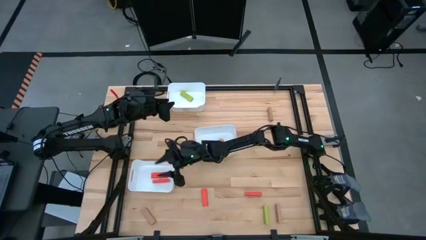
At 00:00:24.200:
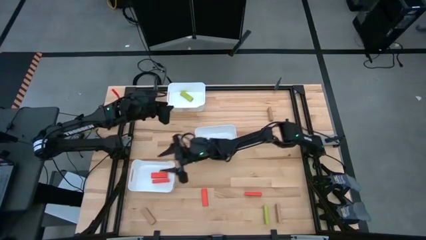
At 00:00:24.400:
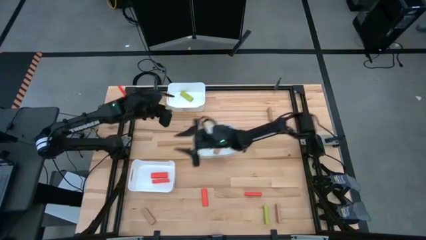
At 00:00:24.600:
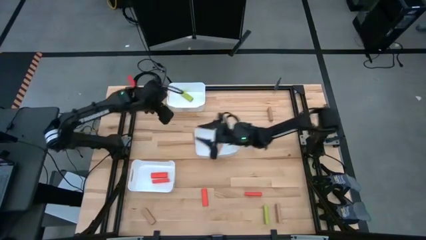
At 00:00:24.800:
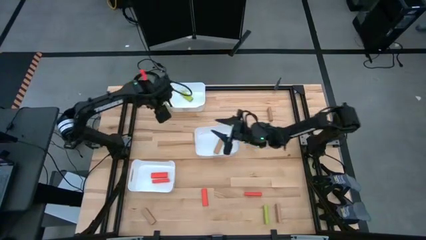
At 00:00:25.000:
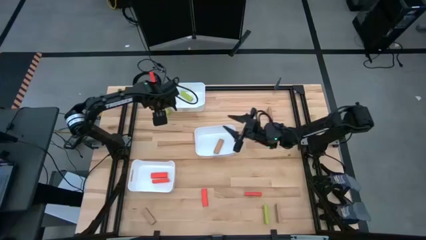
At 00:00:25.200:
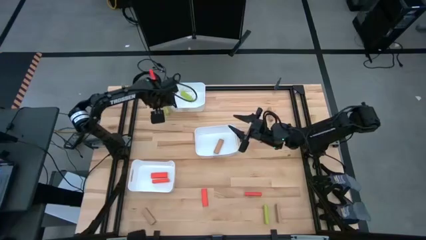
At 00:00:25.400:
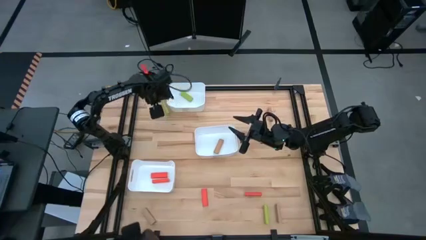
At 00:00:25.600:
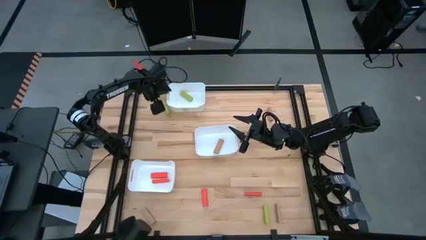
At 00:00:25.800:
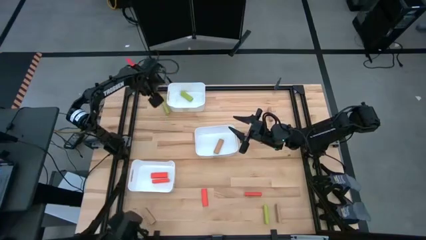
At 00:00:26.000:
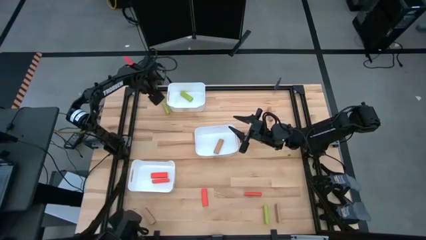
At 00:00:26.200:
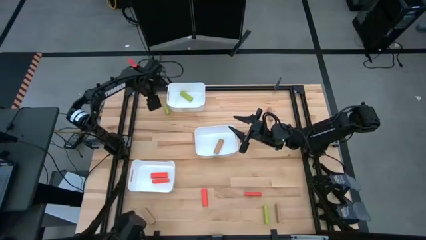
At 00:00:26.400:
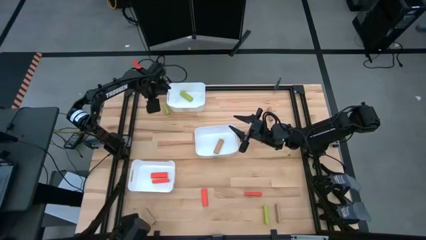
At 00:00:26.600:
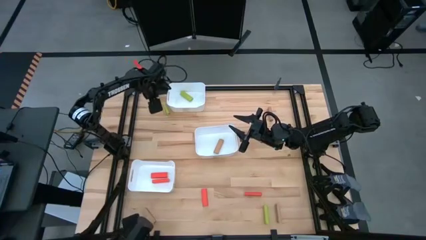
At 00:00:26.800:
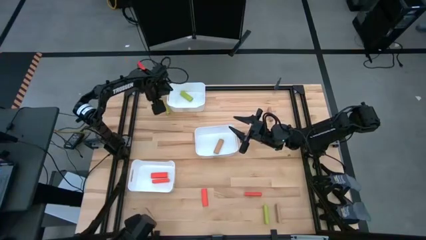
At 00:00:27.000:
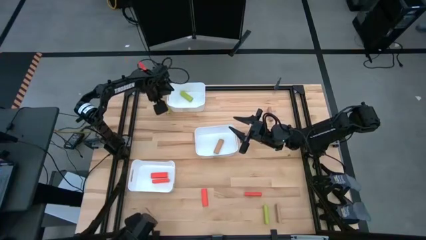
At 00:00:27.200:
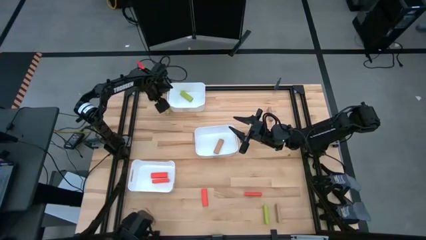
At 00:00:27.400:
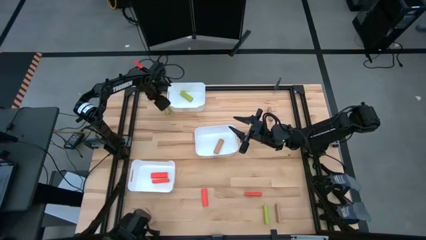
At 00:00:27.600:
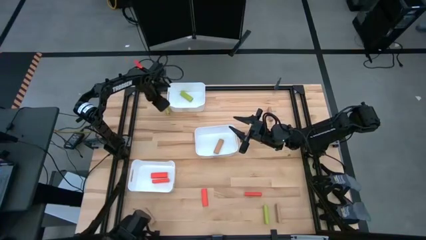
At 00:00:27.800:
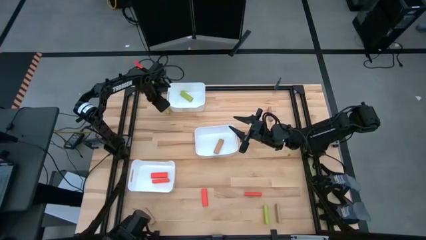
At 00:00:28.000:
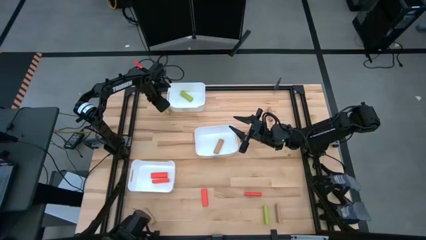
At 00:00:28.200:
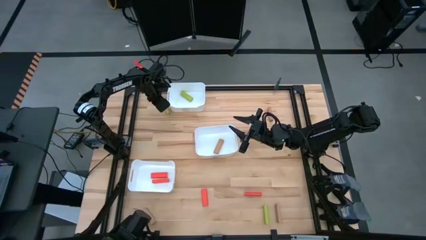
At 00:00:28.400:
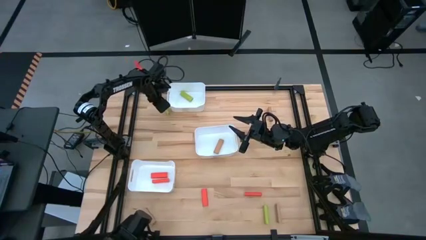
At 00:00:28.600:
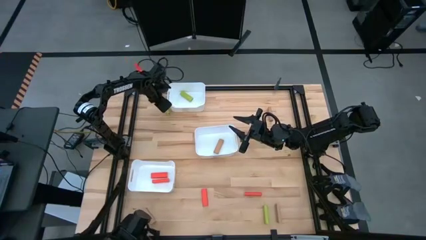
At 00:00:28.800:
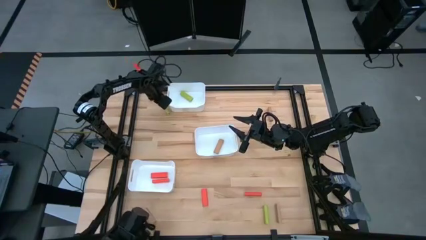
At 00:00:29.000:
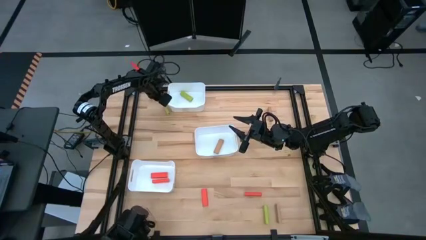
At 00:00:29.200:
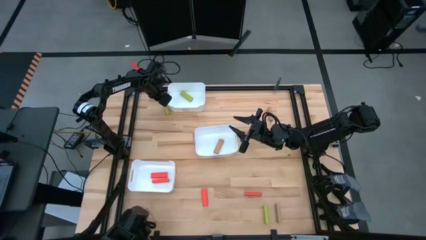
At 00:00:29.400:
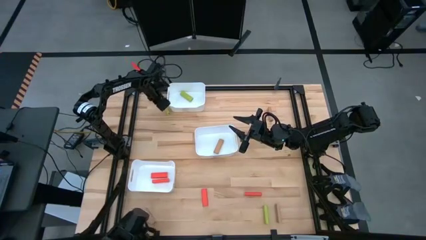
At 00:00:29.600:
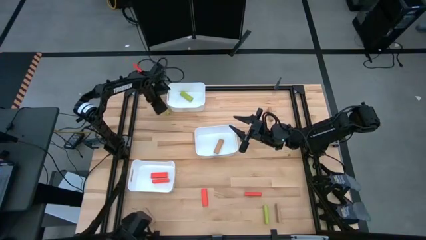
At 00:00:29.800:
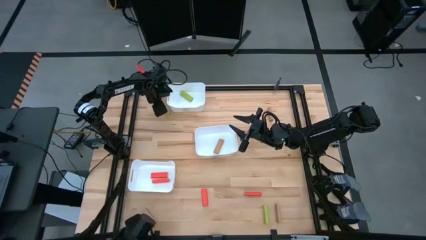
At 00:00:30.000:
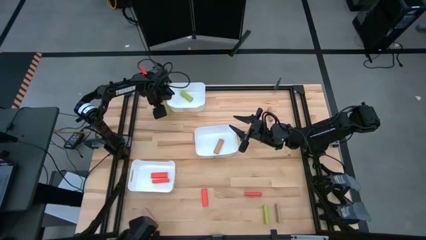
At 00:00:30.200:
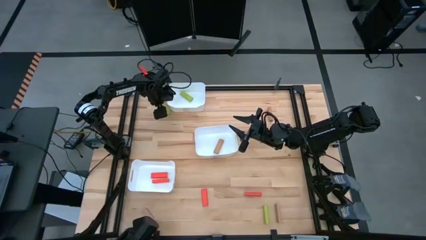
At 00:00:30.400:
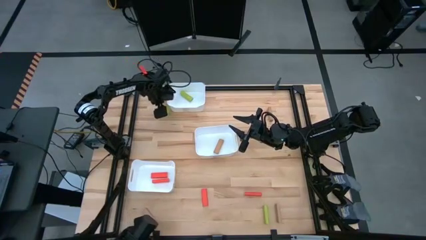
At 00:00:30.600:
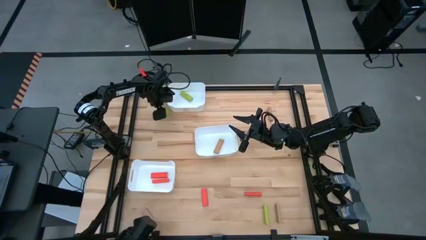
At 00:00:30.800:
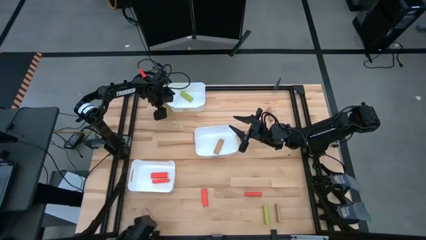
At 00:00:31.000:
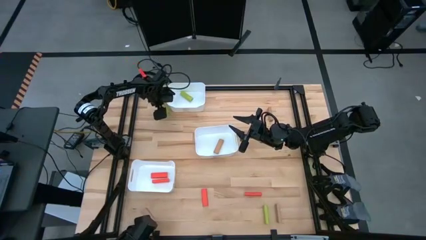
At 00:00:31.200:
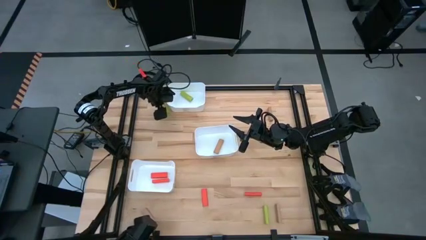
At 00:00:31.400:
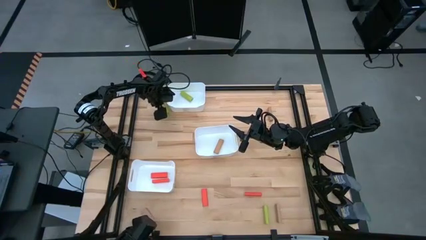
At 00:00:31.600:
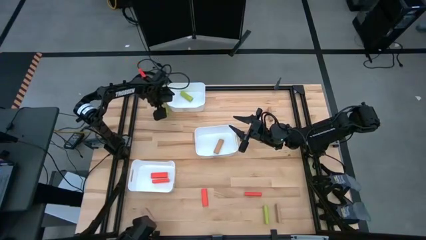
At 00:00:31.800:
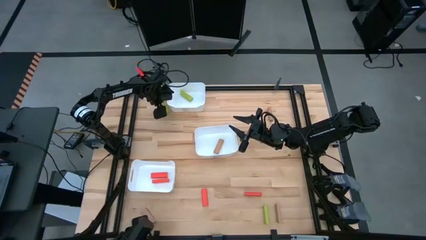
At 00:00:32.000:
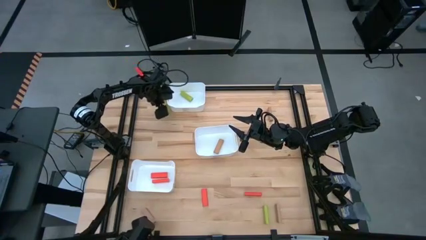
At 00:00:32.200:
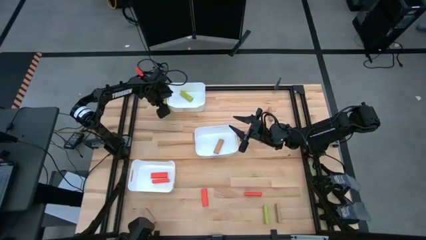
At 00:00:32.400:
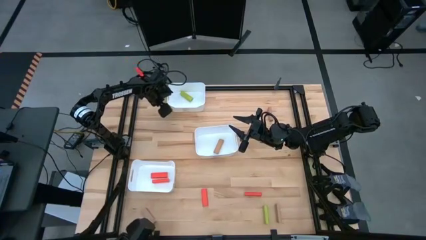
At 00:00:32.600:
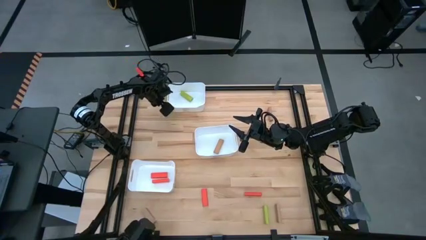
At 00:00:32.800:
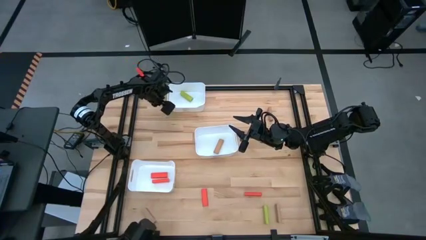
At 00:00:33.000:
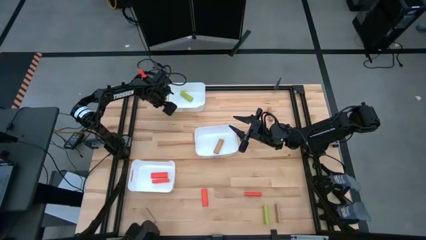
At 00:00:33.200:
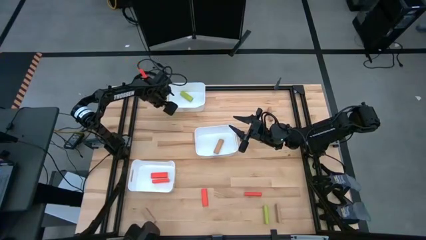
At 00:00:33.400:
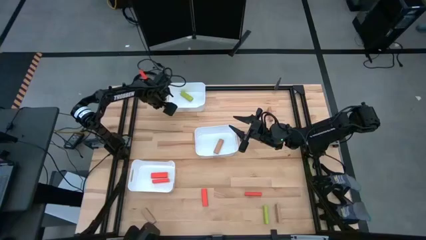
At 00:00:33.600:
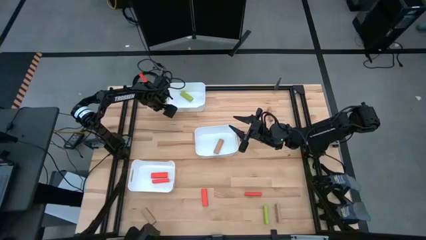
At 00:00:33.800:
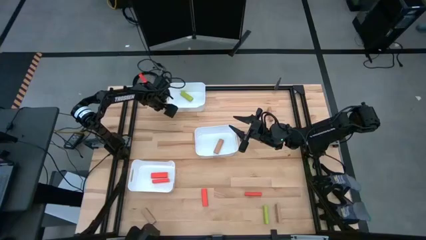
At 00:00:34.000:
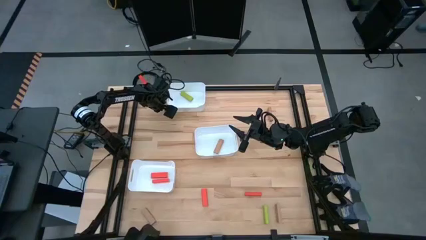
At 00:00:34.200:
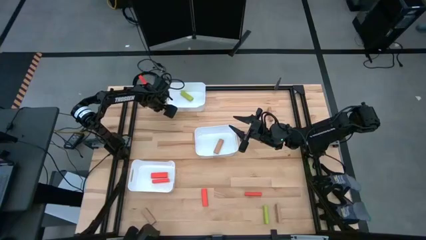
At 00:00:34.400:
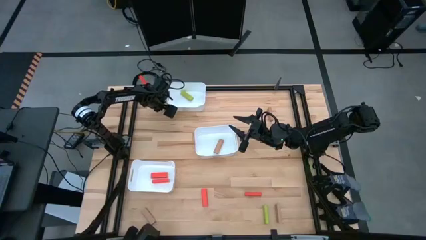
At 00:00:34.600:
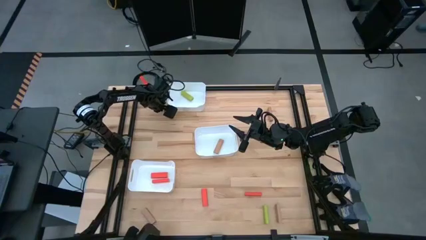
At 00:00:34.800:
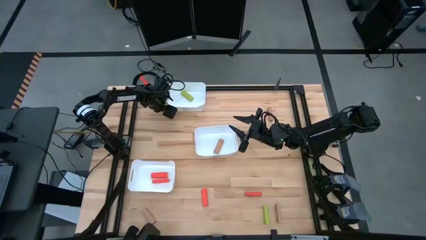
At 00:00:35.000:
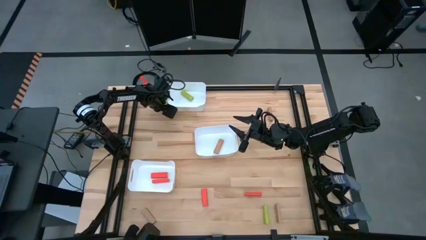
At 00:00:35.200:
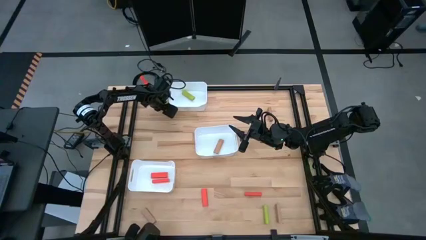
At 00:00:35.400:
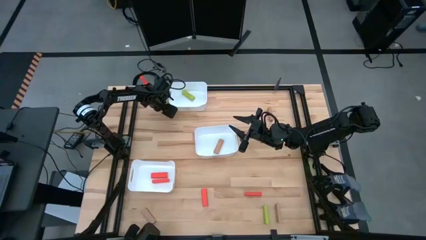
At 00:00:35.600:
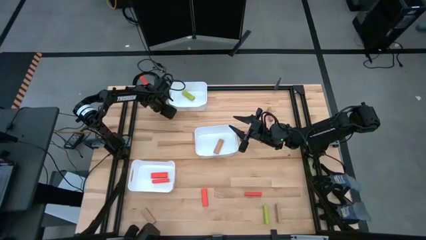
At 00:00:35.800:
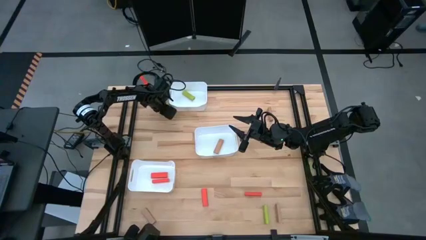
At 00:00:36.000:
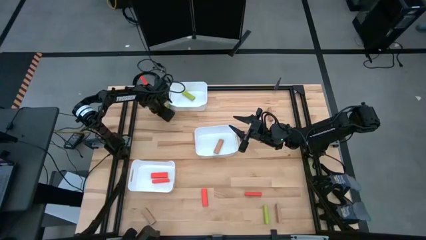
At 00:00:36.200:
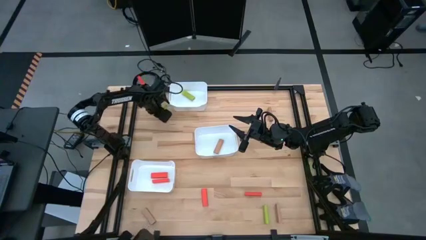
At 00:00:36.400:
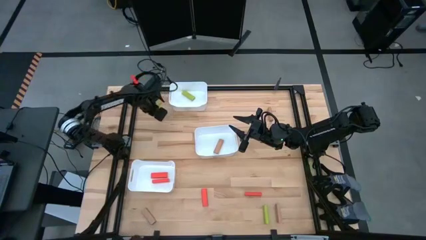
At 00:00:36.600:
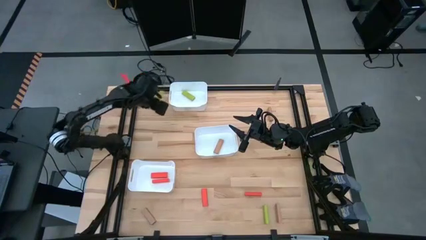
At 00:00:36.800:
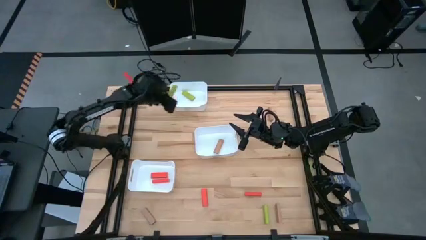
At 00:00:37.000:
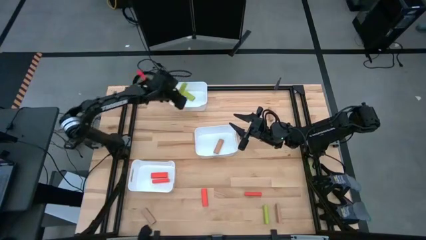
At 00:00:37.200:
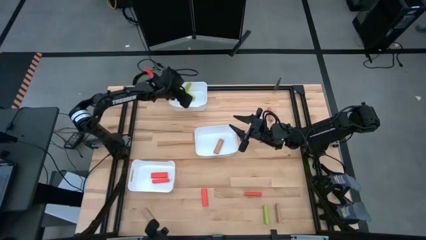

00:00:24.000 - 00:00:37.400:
Task: Sort blocks
Put the green block into the top white bin

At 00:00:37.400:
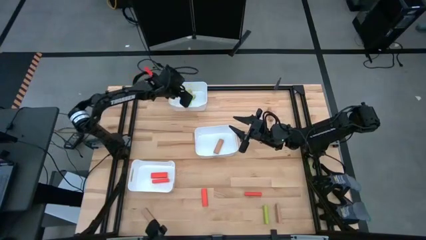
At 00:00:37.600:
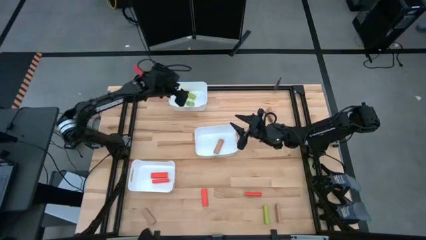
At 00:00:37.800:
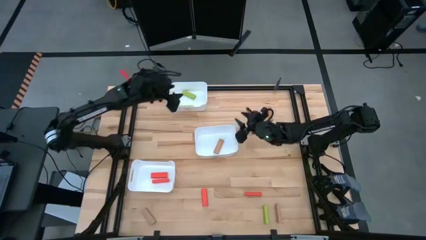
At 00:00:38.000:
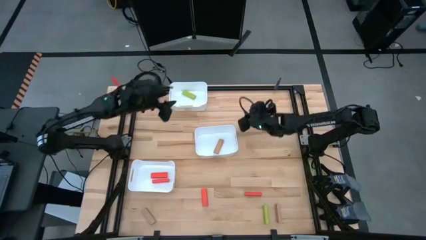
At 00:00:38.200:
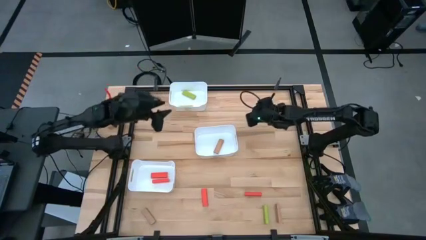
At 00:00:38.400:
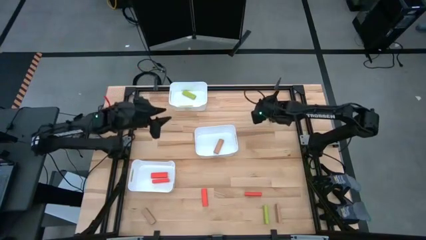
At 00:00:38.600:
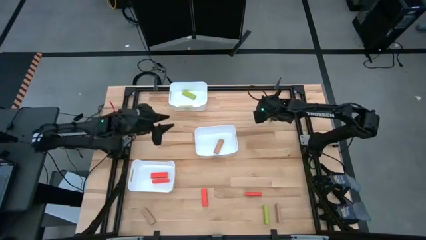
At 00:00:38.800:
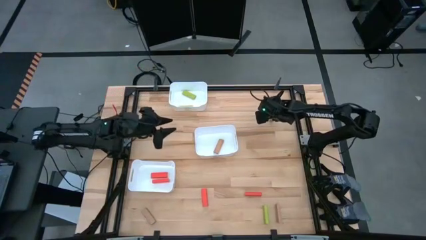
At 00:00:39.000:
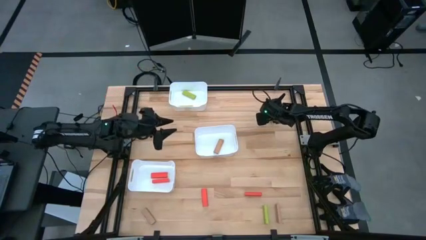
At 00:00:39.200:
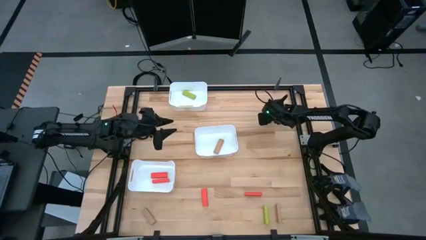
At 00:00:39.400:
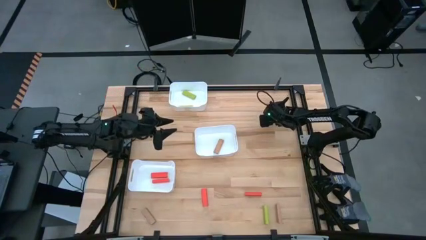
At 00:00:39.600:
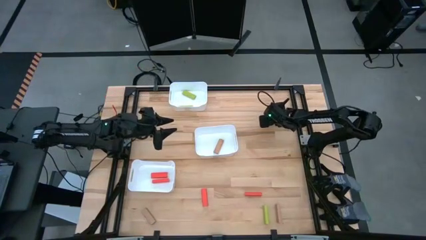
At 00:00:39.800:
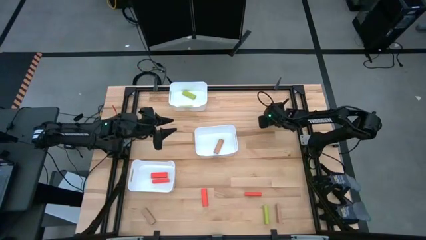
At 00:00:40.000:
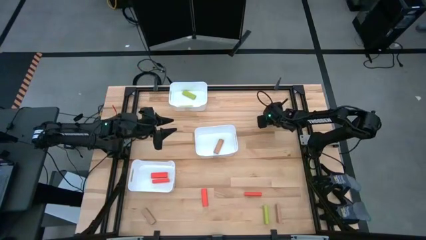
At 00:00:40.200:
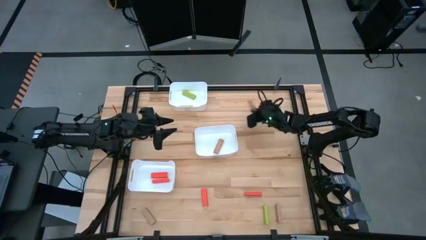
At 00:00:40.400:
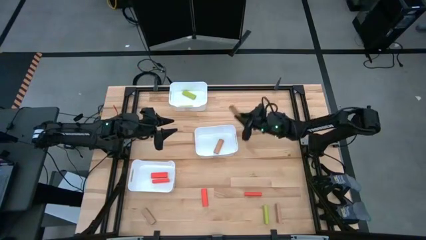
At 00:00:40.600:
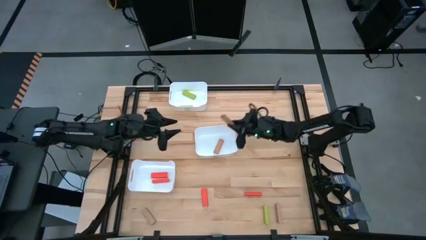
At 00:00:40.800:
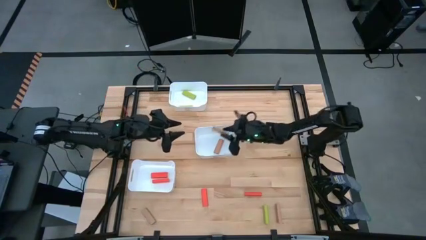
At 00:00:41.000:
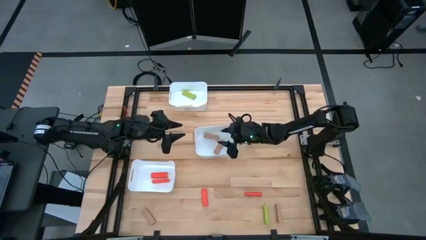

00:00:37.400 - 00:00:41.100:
Put the brown block into the middle white bin
